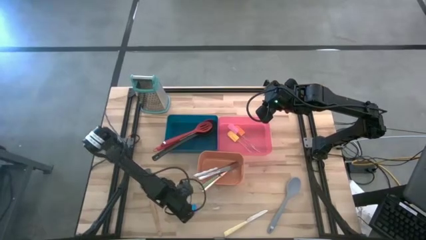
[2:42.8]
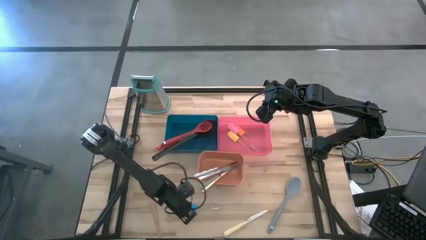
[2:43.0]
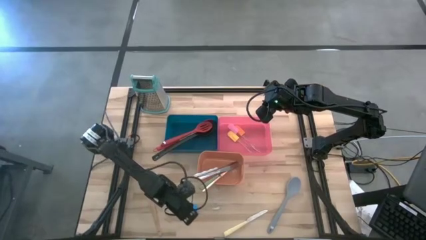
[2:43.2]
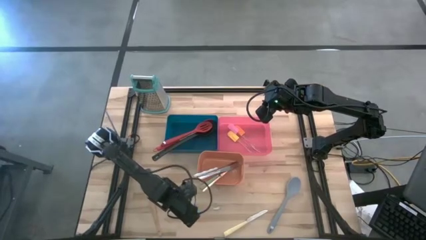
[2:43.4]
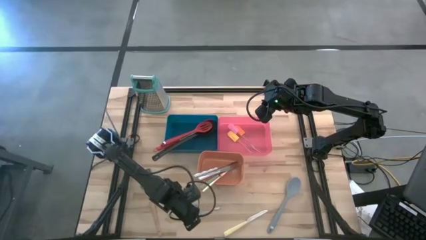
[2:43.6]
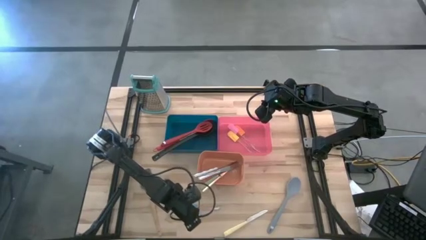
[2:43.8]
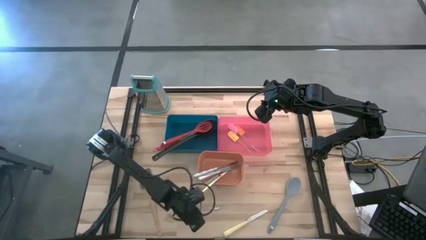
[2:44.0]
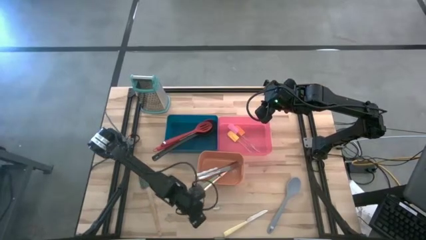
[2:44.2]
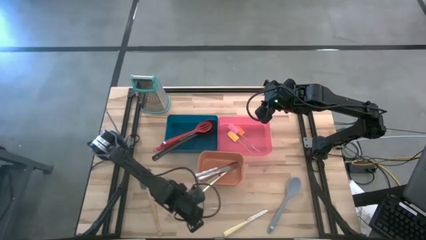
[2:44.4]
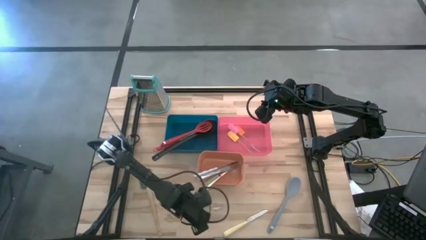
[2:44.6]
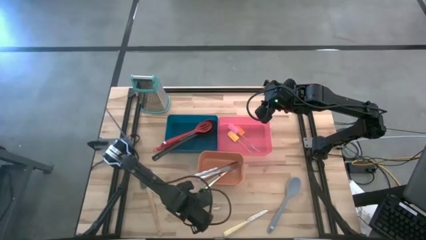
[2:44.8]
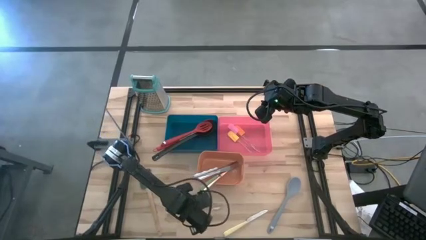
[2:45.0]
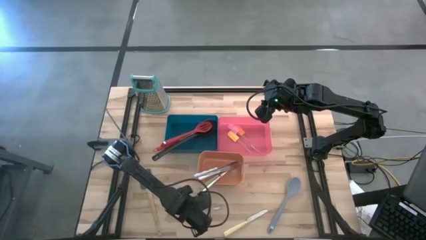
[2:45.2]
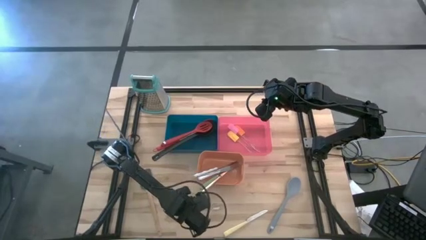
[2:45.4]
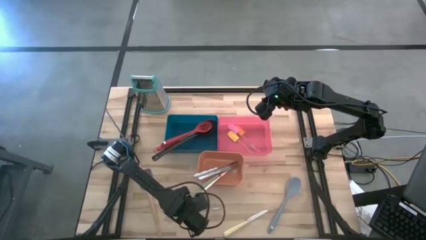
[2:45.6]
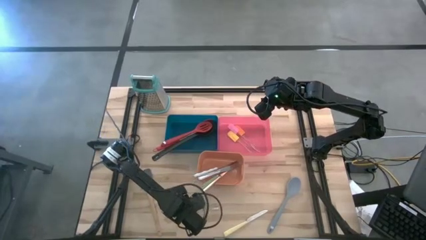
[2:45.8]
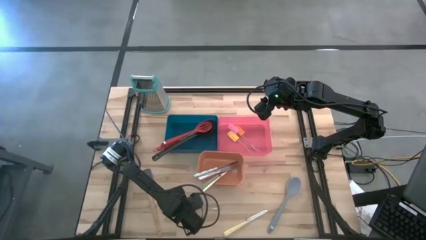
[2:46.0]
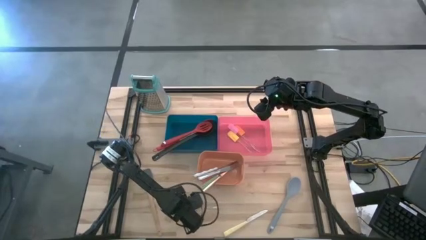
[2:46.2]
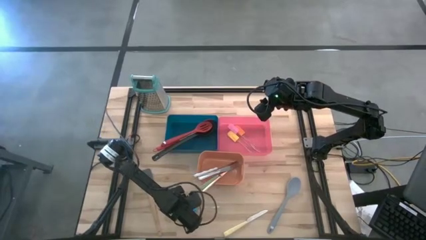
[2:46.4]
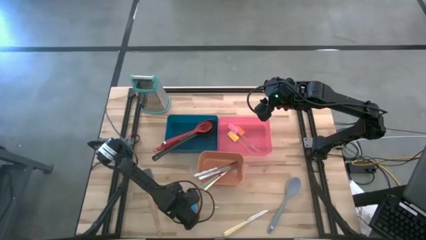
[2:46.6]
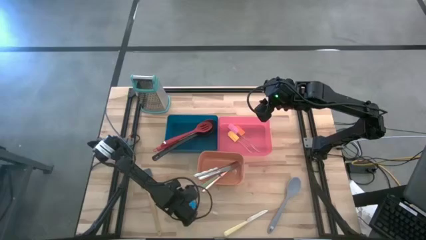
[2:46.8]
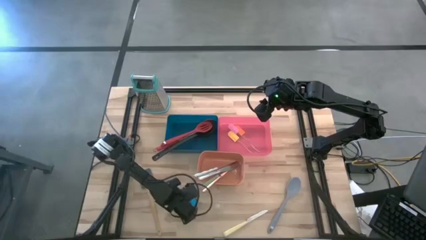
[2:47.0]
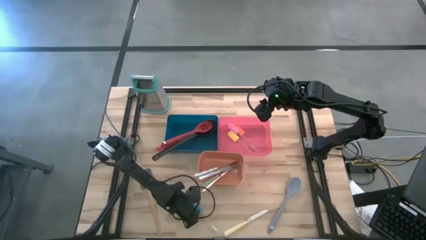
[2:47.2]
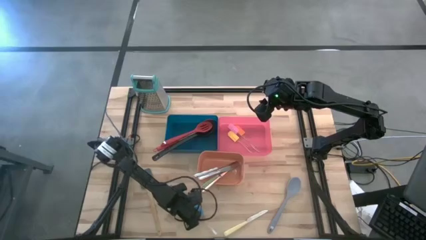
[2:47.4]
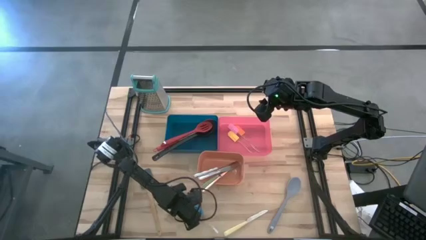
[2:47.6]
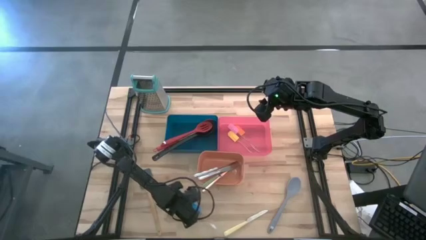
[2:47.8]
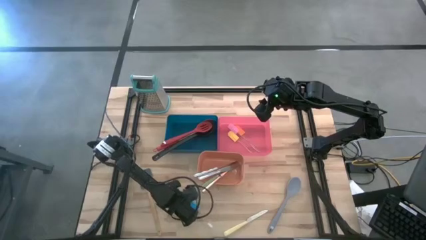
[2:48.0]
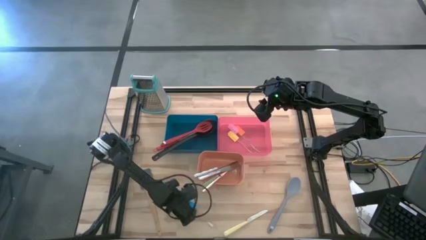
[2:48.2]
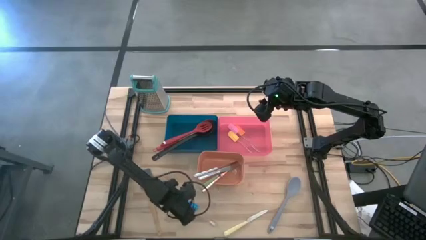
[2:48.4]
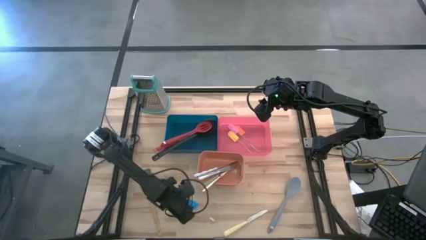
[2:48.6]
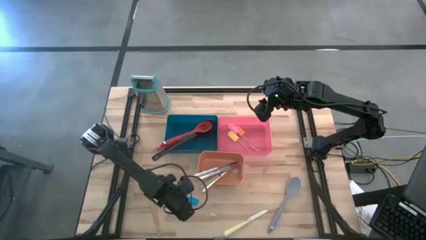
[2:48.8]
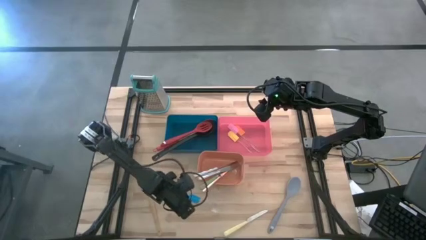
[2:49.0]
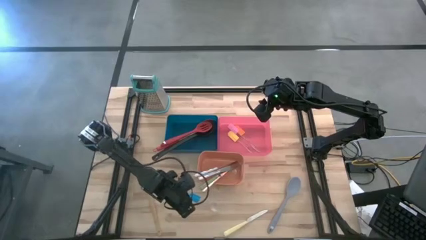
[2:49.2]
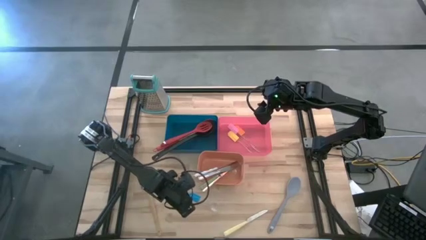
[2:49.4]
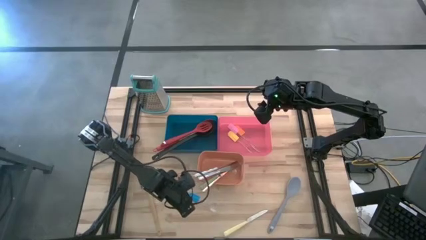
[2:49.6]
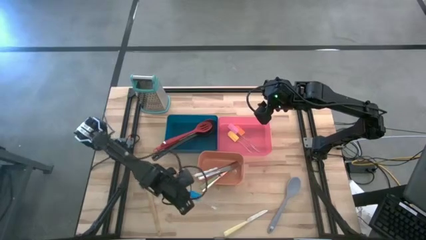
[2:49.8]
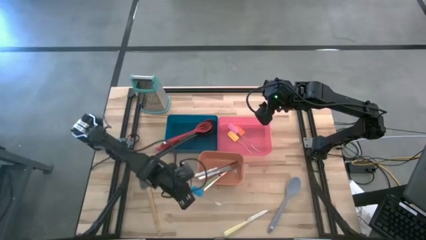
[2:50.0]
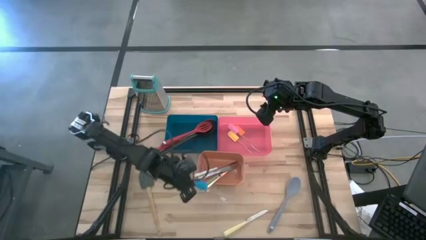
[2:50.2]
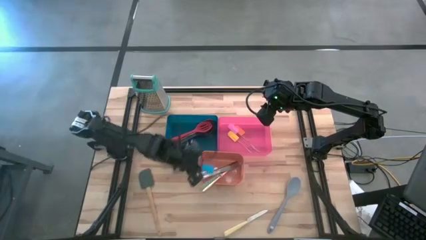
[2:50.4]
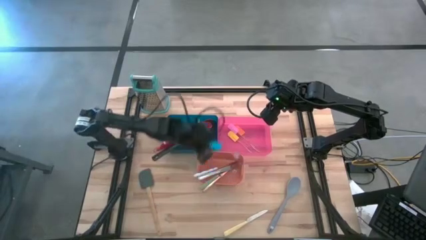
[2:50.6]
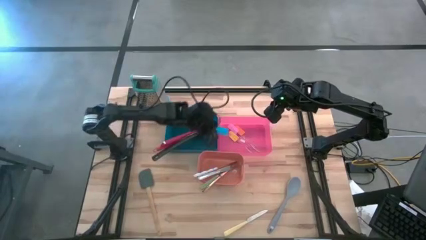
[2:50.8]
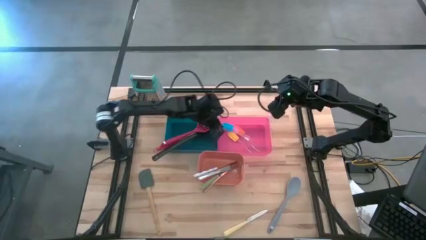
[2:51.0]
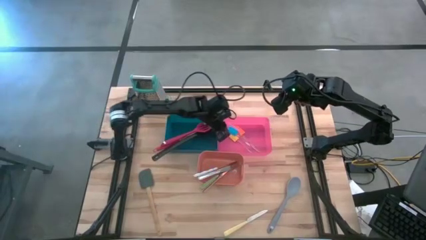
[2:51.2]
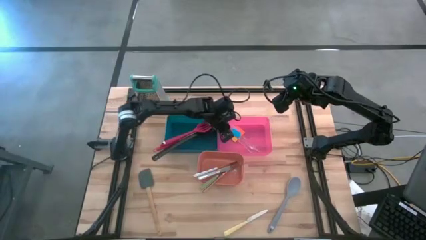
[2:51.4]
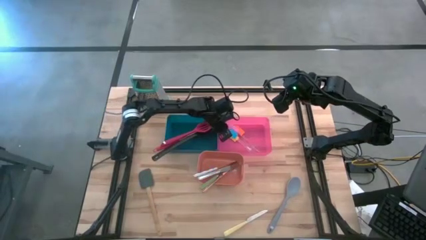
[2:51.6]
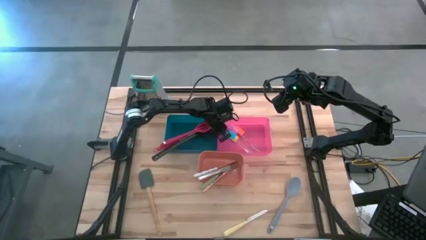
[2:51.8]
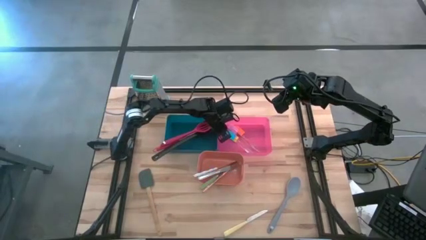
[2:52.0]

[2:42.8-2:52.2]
Task: Pick & Place Kitchen Items
Put the blue spatula into the red bin

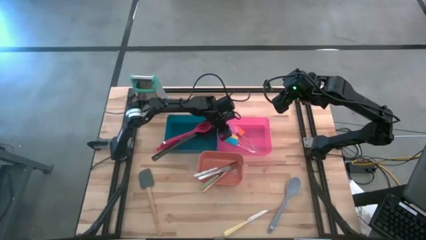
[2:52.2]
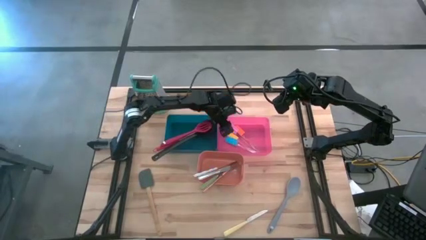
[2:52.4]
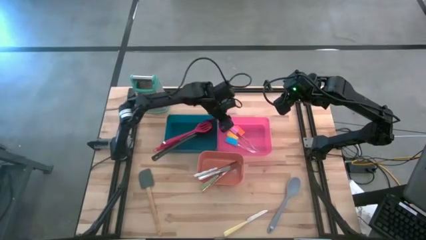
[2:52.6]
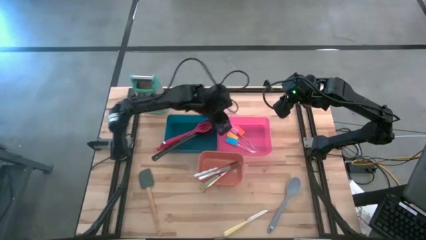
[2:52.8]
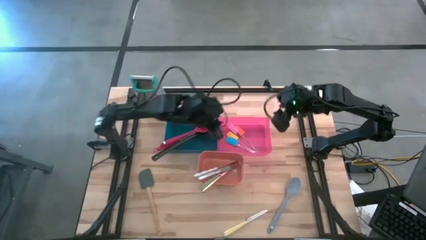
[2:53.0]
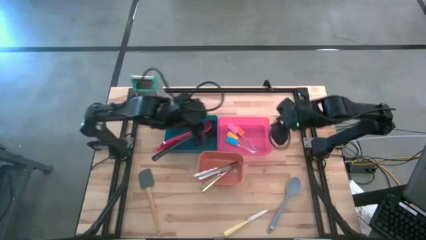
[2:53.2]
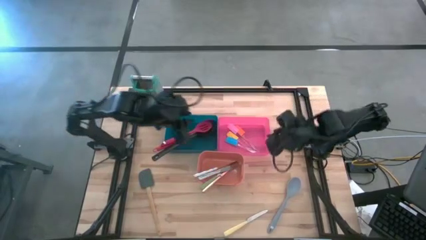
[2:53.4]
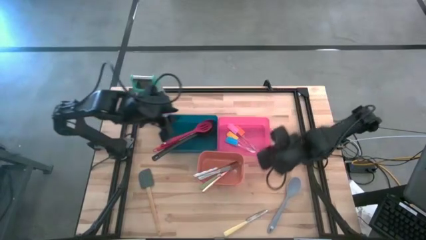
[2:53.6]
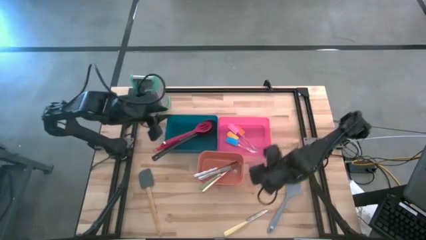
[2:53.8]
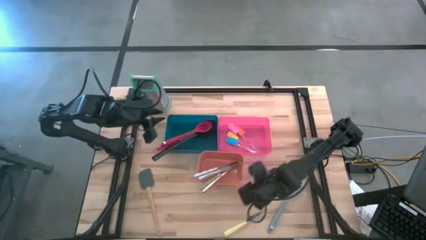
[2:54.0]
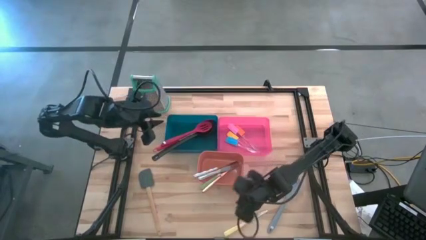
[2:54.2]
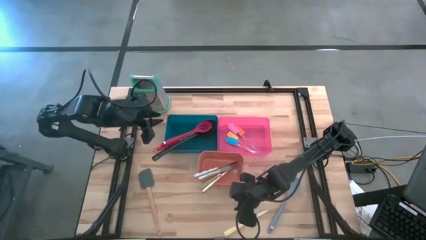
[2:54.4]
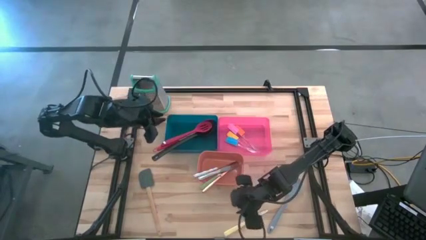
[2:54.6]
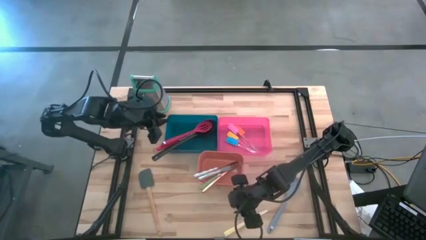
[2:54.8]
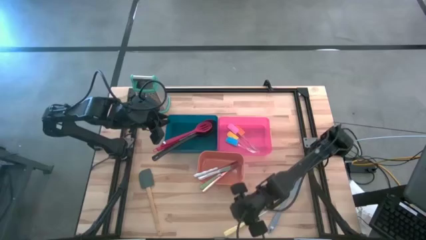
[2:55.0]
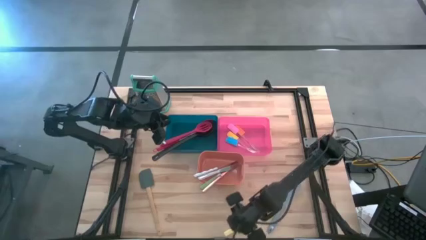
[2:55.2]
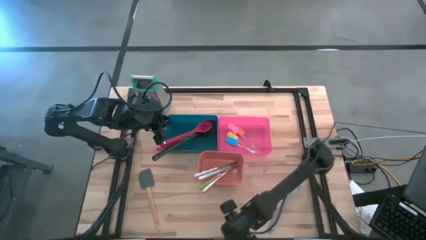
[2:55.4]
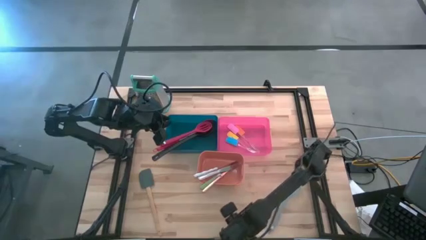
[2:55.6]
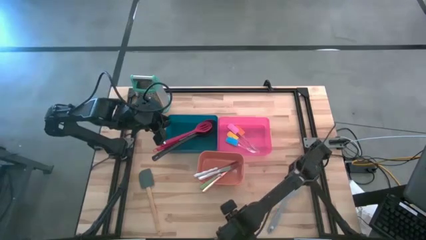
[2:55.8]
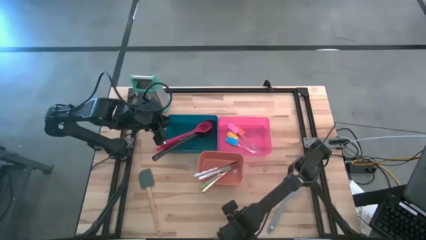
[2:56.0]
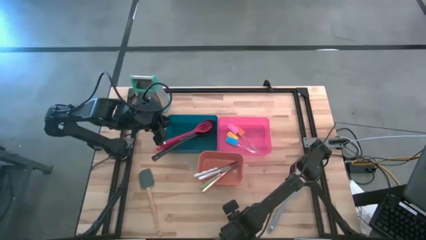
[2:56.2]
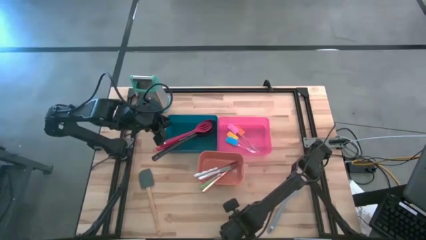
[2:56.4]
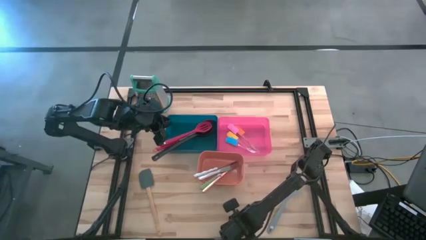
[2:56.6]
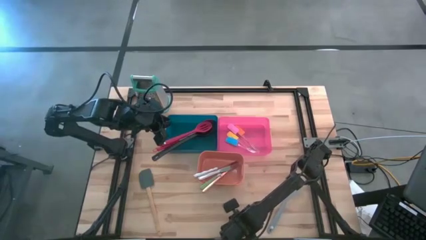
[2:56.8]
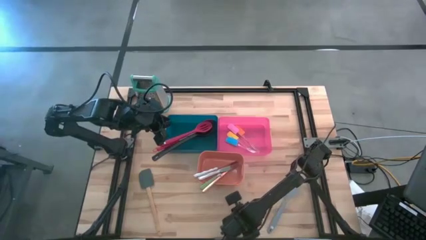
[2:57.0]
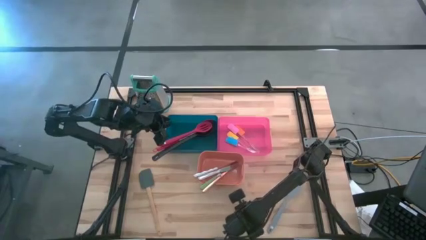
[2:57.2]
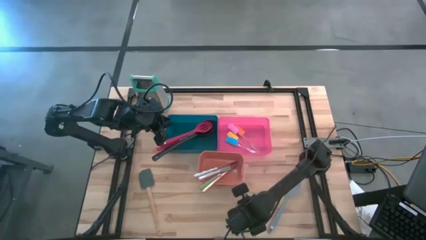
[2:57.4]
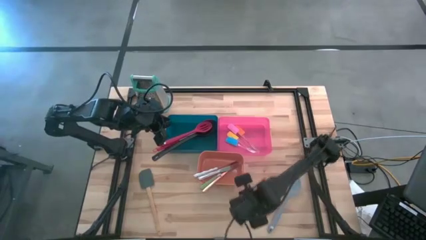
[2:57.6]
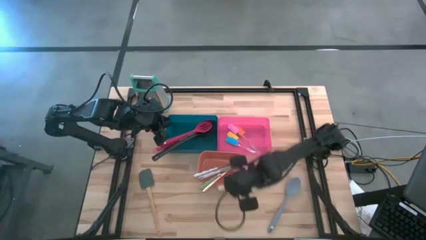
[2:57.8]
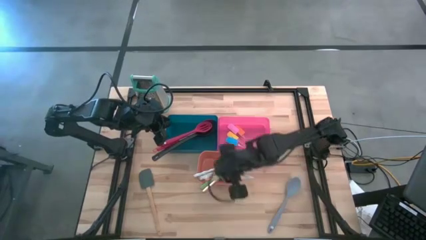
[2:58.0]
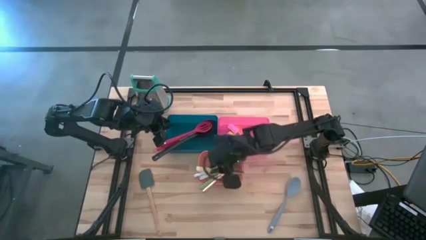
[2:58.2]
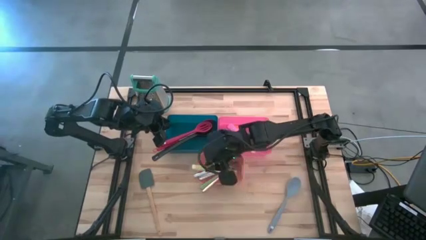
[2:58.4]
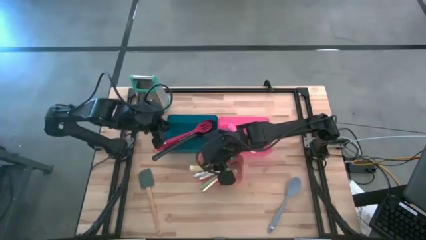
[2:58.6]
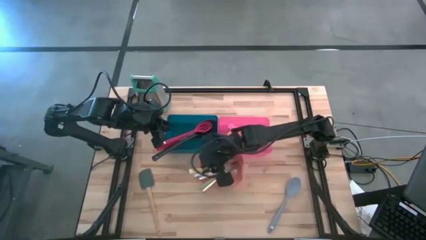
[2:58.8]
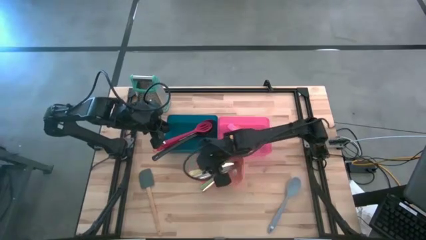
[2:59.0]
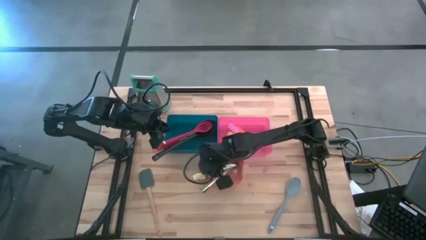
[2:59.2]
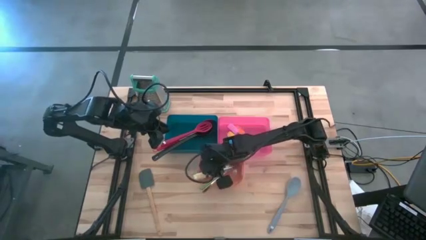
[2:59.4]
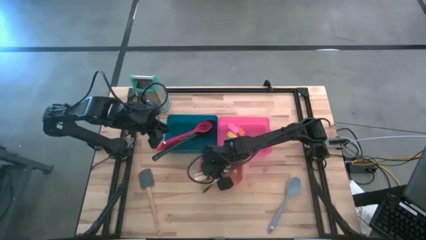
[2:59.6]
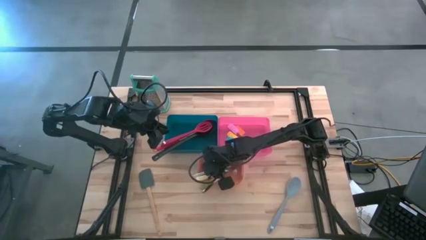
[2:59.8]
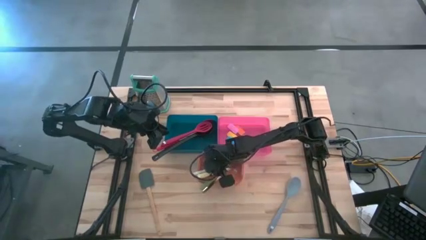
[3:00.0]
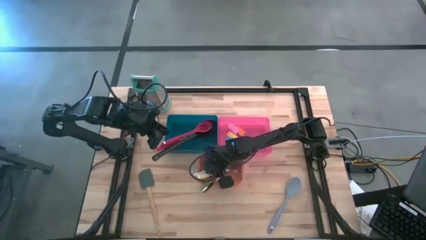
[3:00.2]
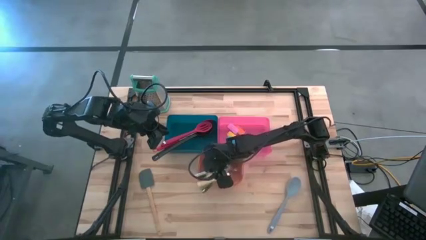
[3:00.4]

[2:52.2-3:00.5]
Put the yellow knife into the orange bin
